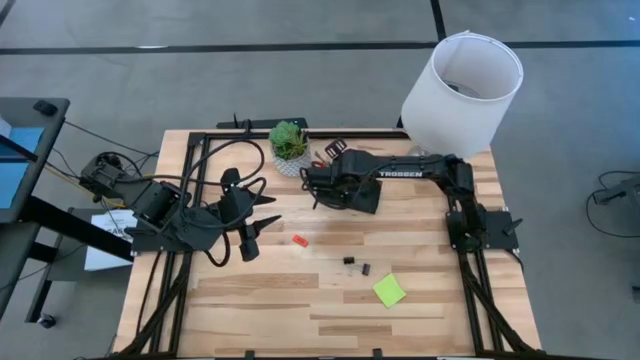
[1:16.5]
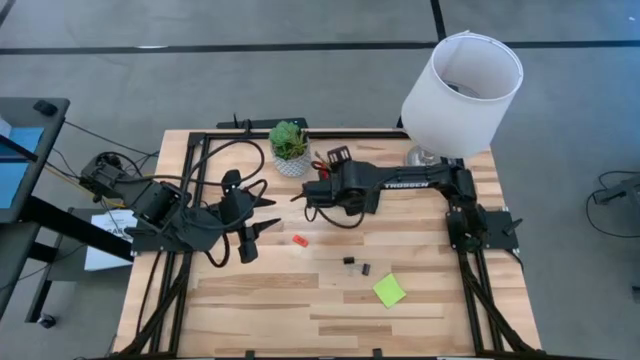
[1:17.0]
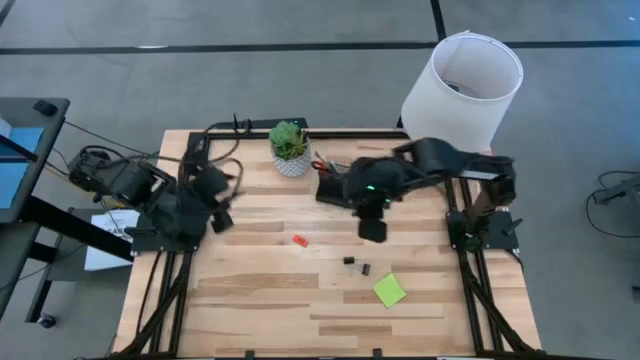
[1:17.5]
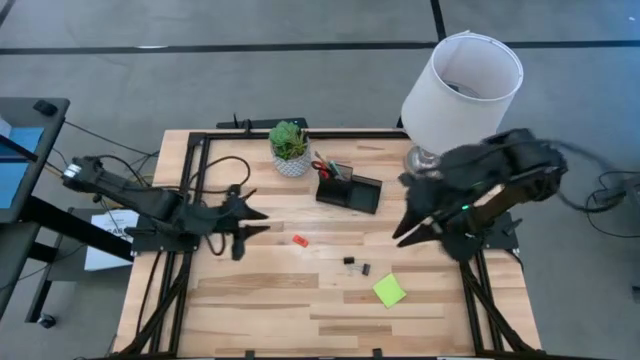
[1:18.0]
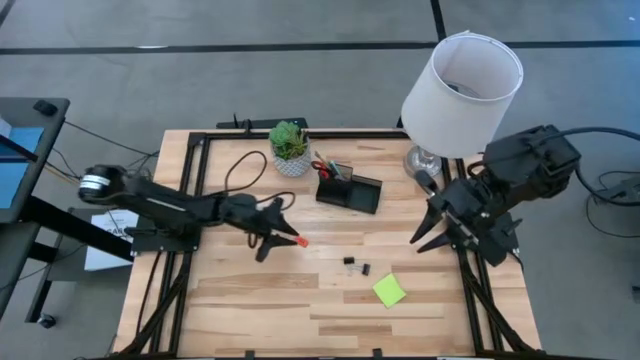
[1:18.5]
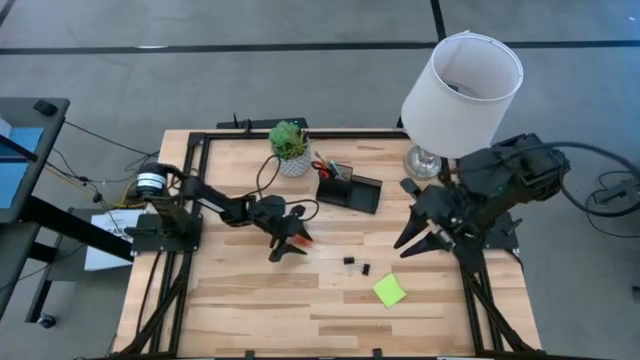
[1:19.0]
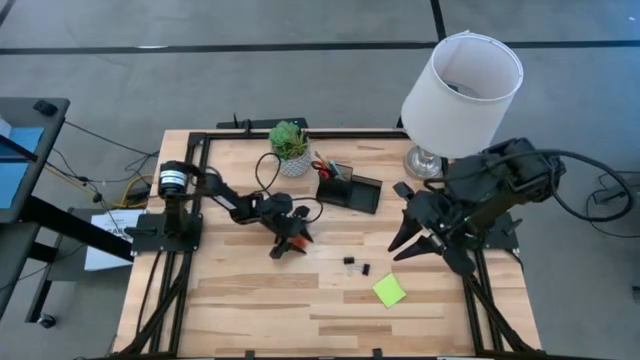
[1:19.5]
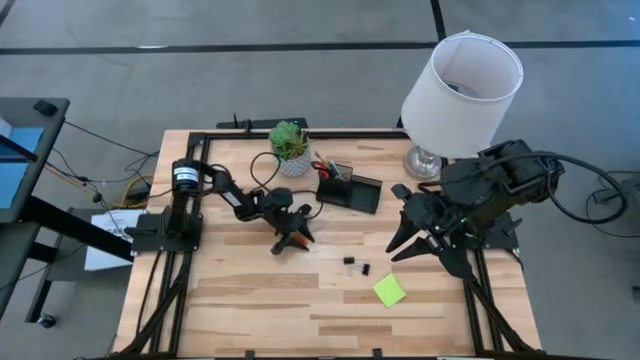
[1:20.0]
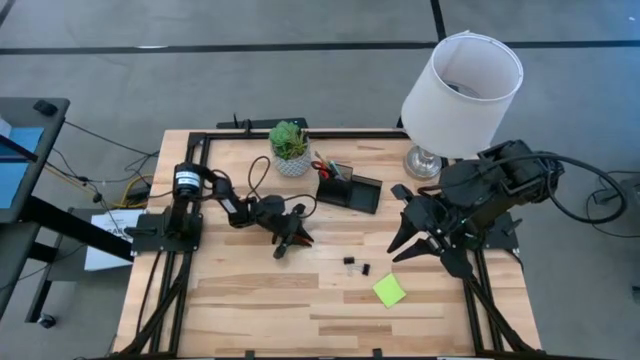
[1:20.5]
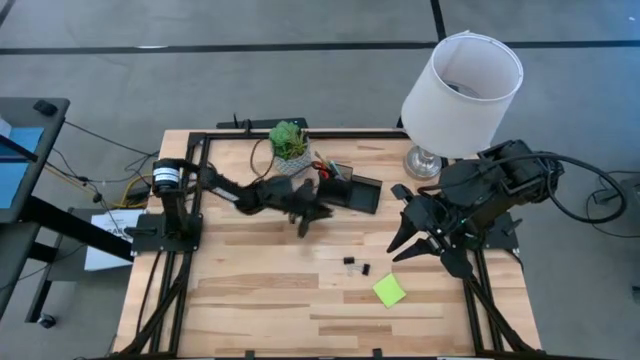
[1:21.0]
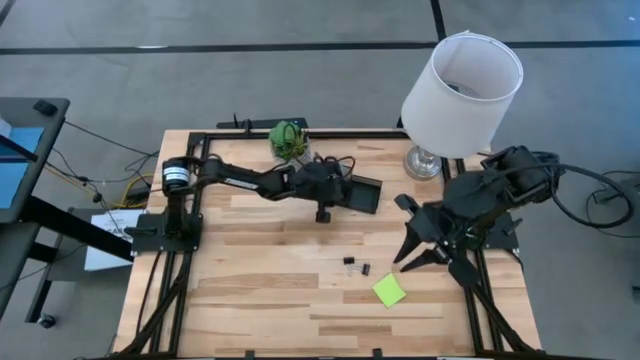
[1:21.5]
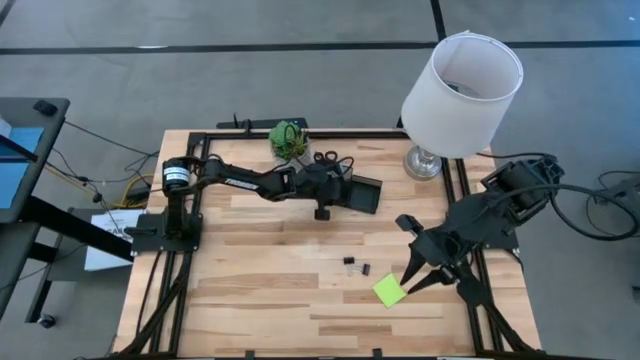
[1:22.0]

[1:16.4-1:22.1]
Task: Pick and place office supplies into organizer
Put the orange eraser into the black desk organizer

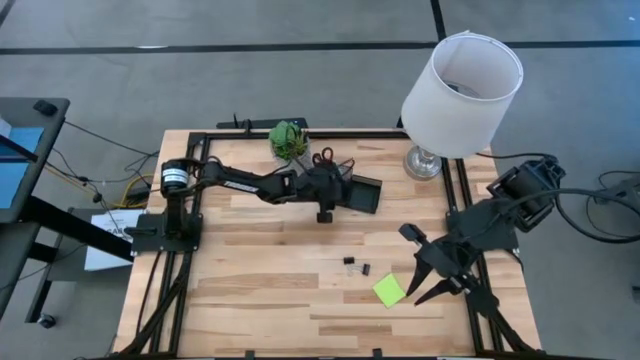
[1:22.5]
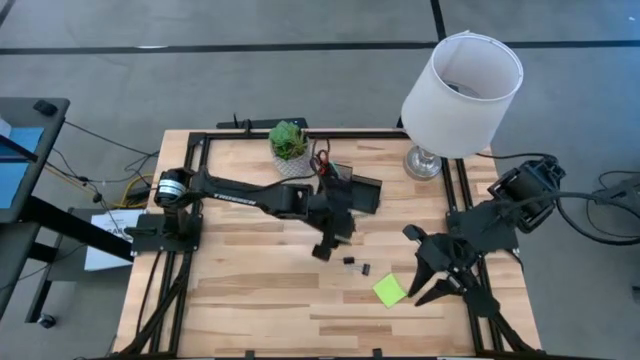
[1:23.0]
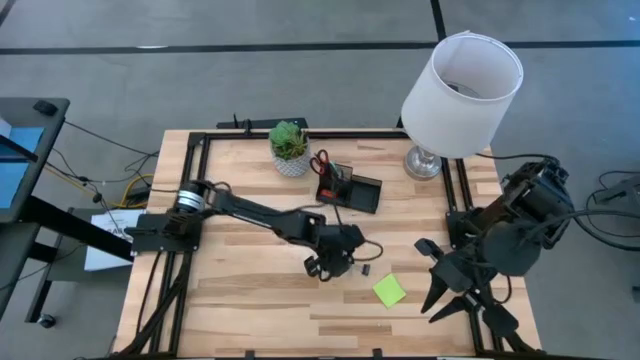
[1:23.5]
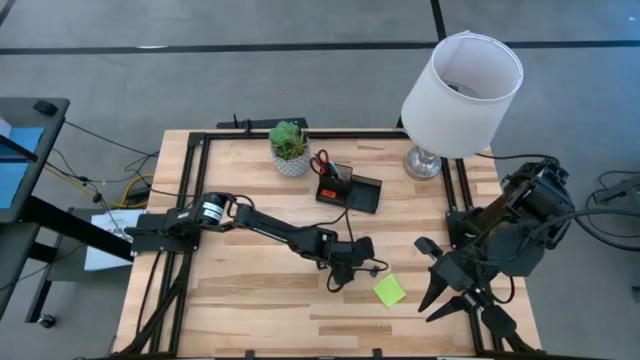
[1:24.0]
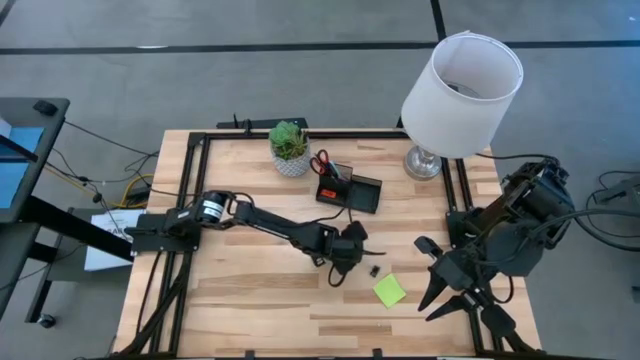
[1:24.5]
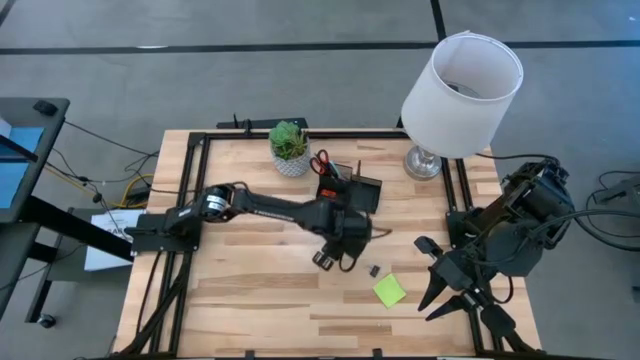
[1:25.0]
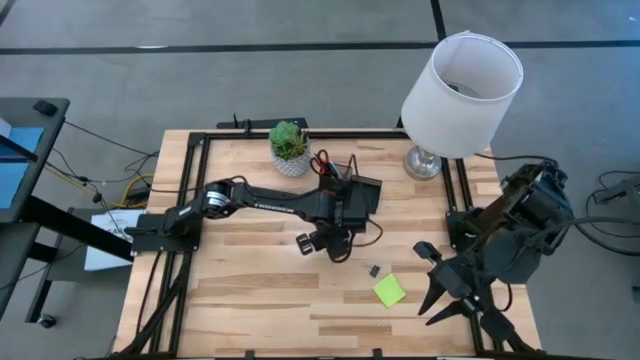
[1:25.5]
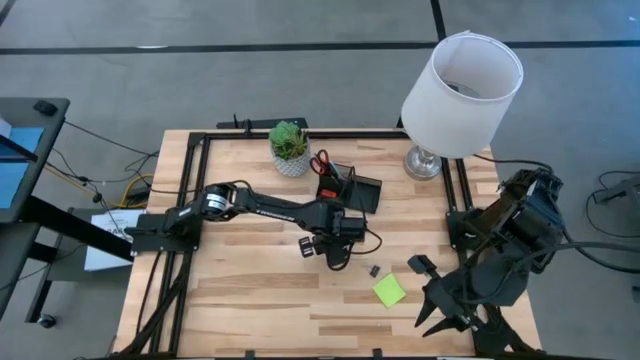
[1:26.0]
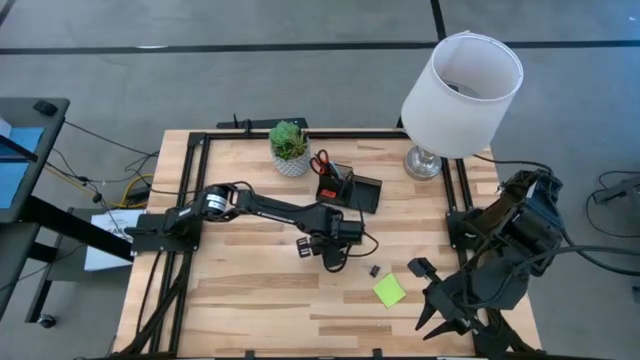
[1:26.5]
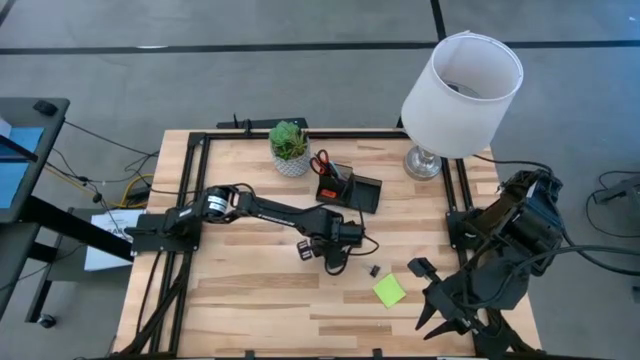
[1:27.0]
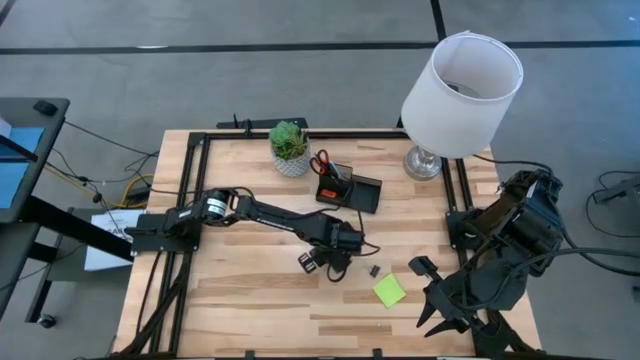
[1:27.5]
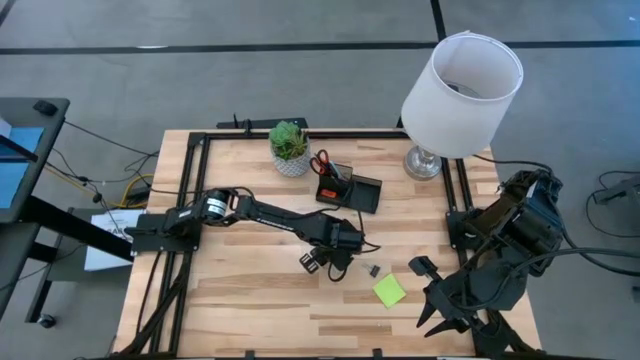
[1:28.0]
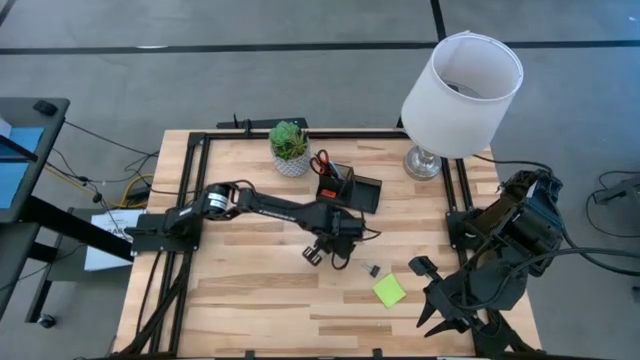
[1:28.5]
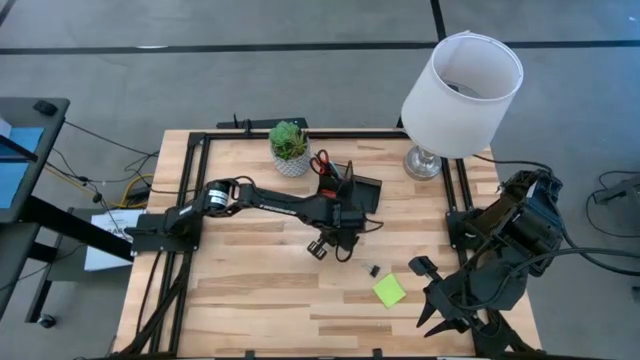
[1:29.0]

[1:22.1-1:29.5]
Put the left black binder clip into the black desk organizer

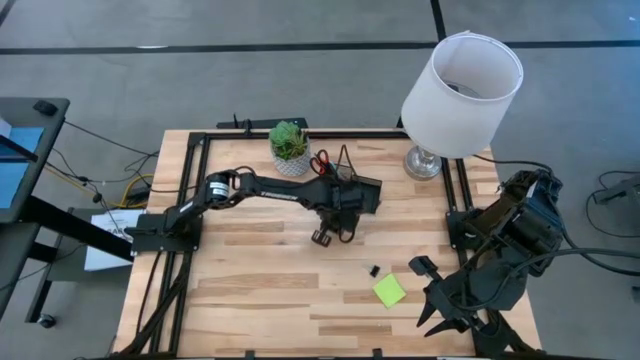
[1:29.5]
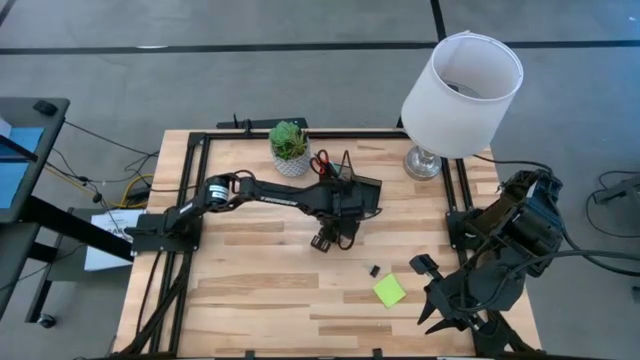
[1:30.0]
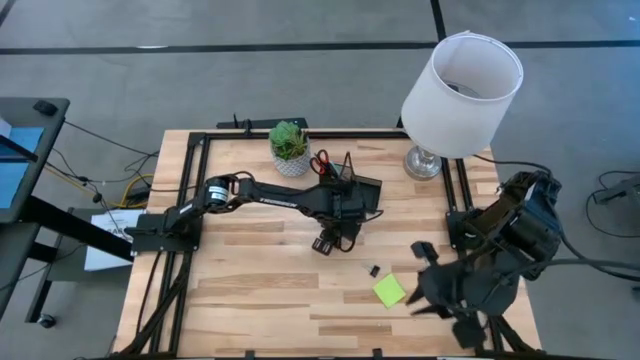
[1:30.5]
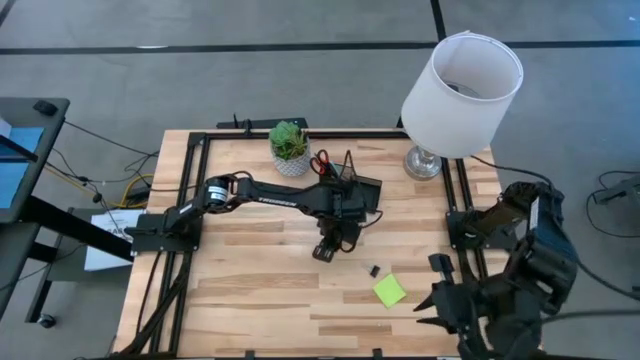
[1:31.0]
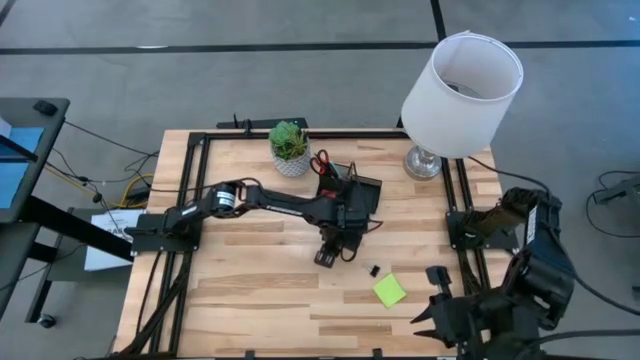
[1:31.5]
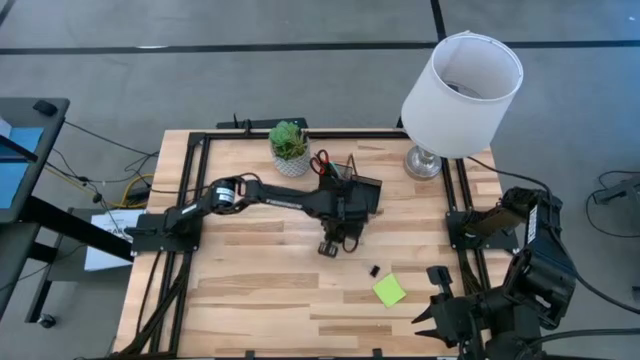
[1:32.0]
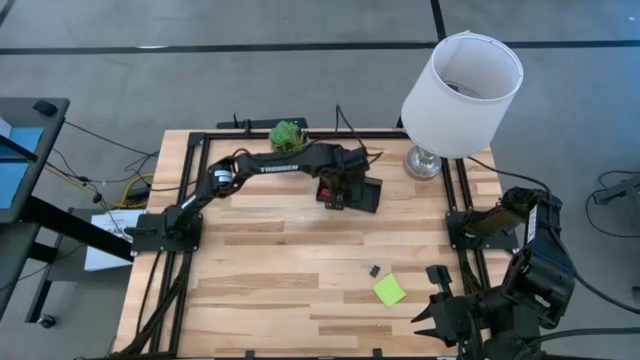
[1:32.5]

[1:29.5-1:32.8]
Put the left black binder clip into the black desk organizer

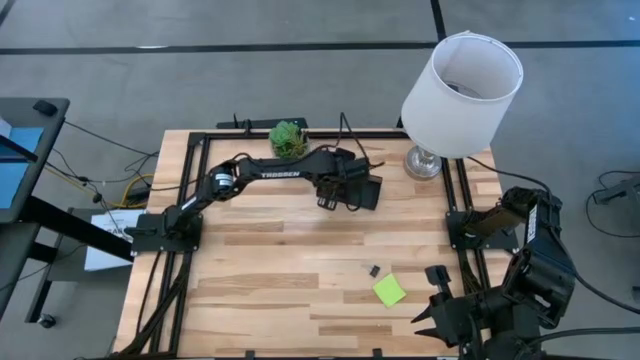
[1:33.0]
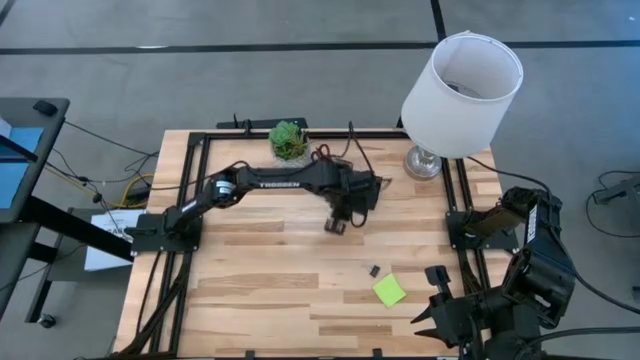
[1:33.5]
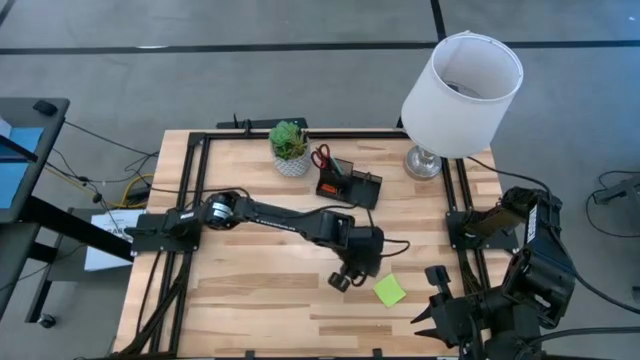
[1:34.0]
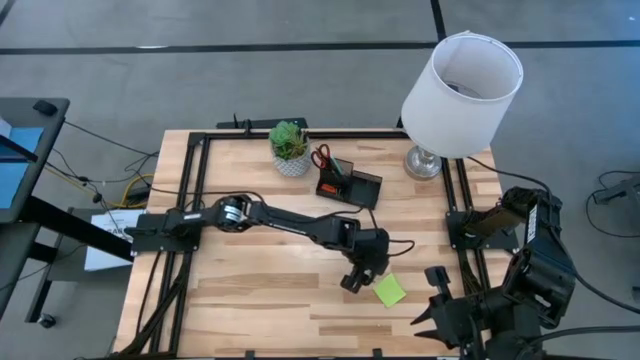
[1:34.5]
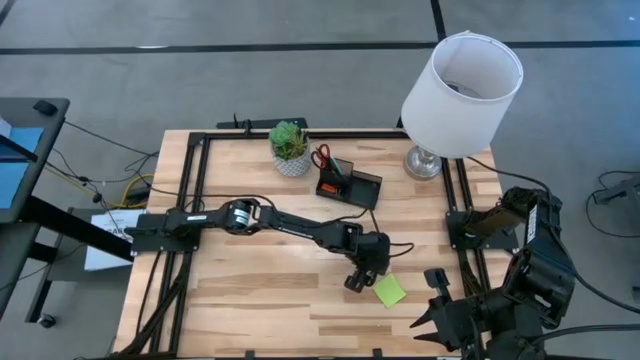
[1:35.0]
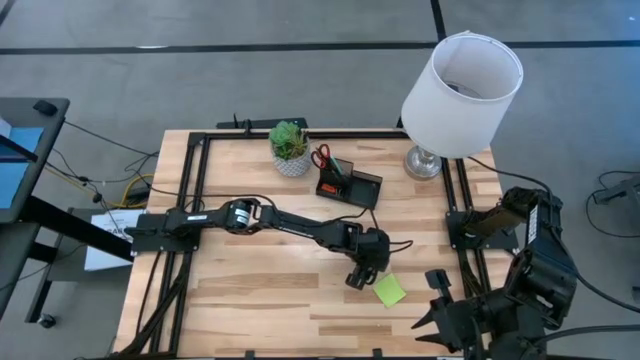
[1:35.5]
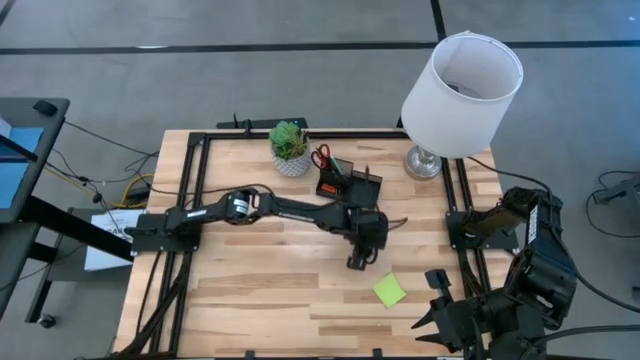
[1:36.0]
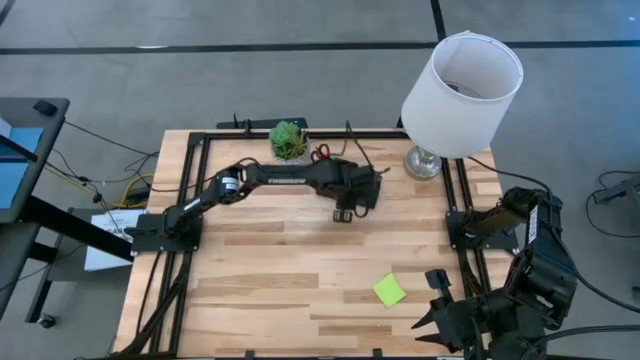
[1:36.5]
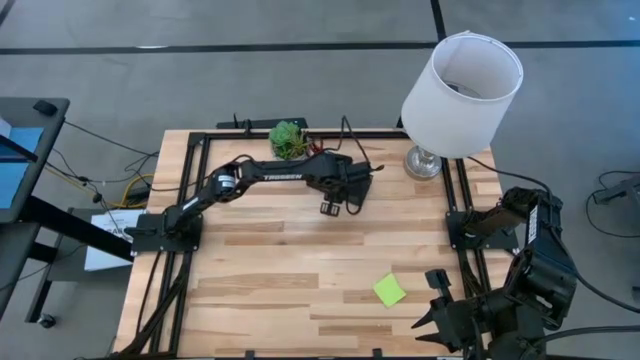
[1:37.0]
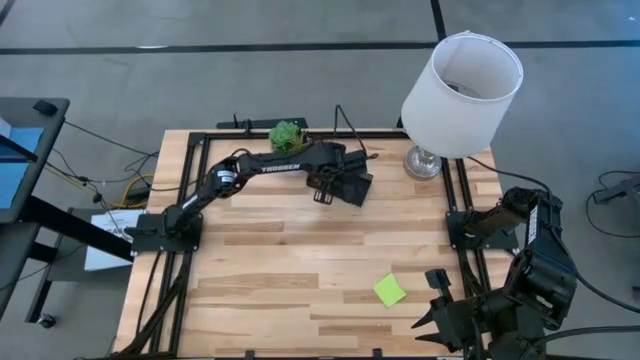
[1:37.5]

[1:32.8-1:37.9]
Put the black binder clip into the black desk organizer
